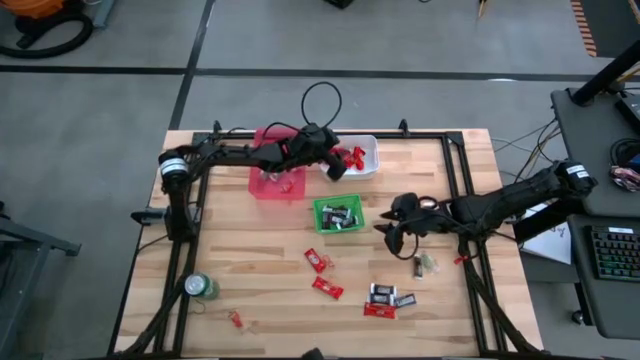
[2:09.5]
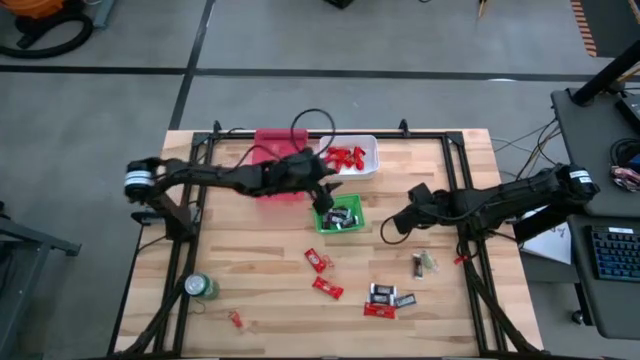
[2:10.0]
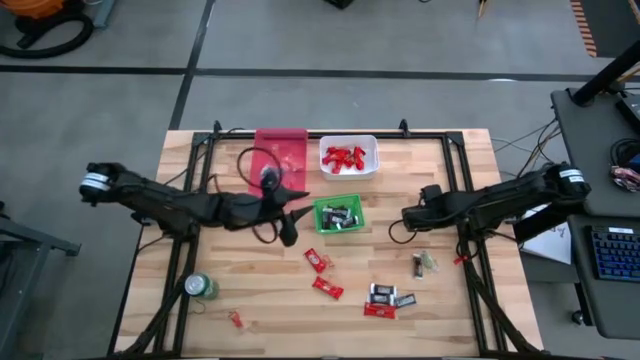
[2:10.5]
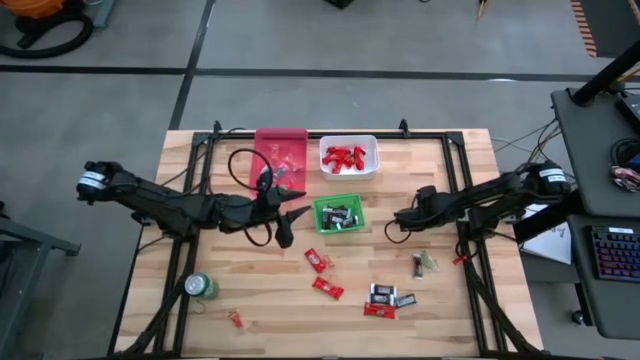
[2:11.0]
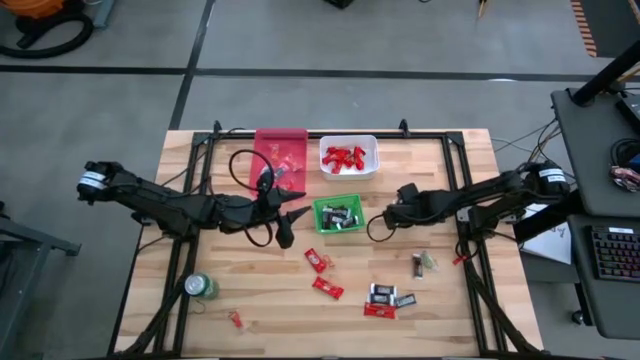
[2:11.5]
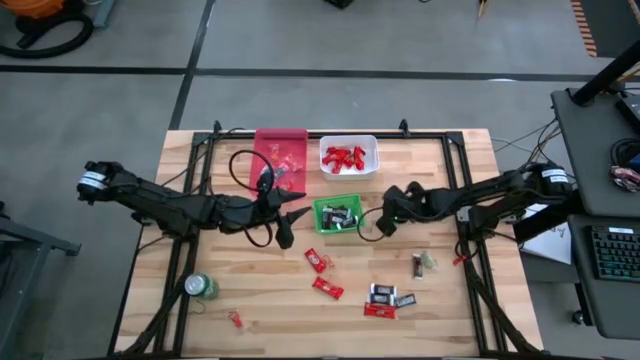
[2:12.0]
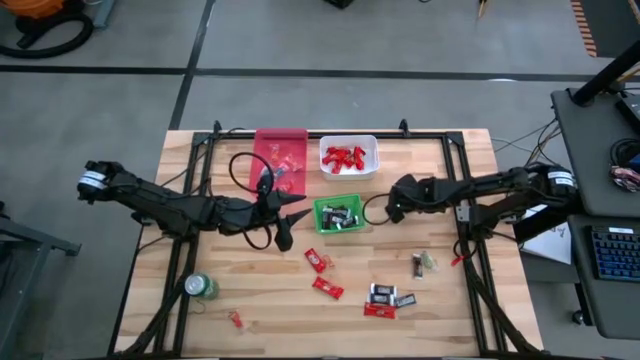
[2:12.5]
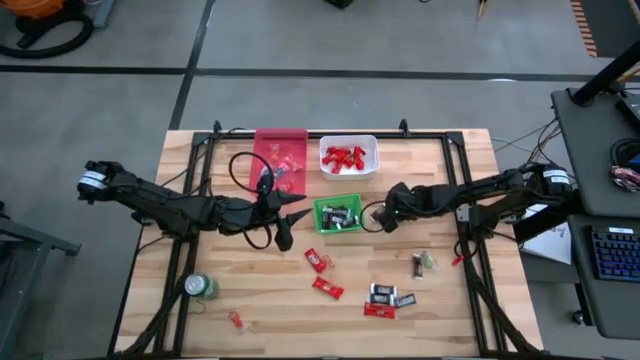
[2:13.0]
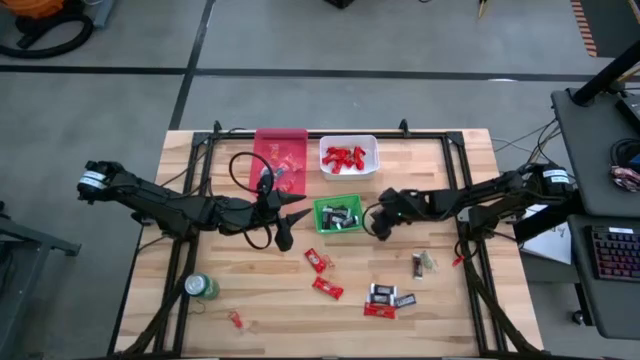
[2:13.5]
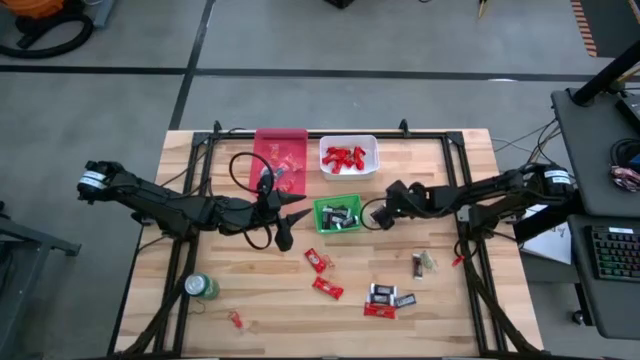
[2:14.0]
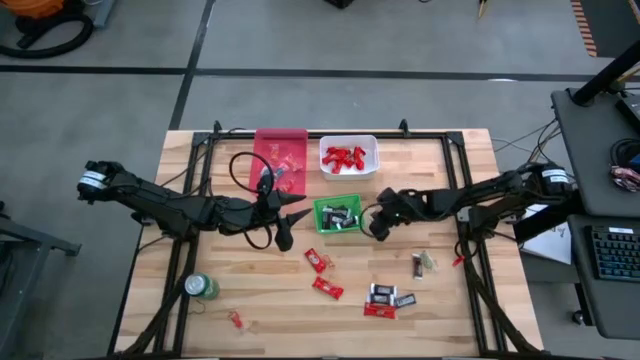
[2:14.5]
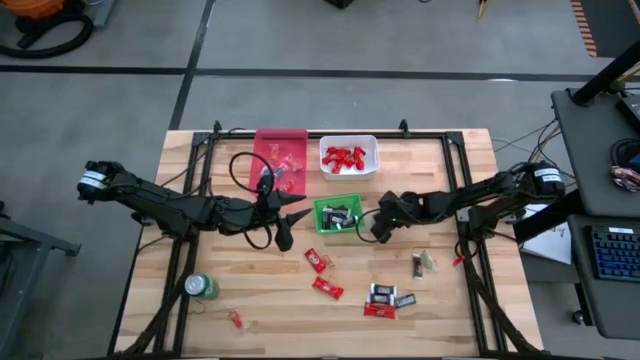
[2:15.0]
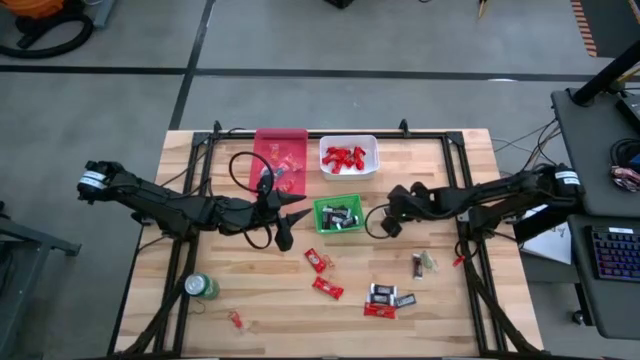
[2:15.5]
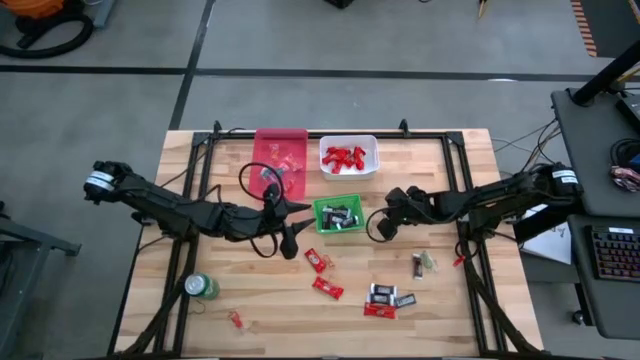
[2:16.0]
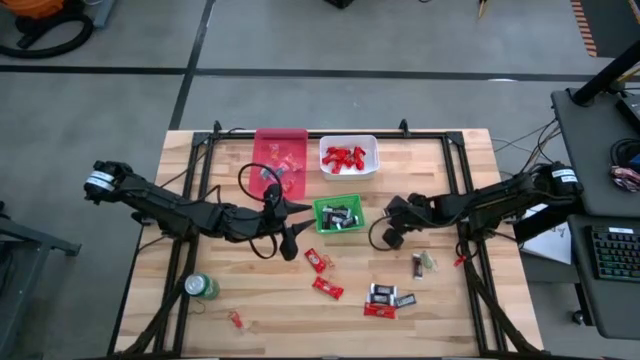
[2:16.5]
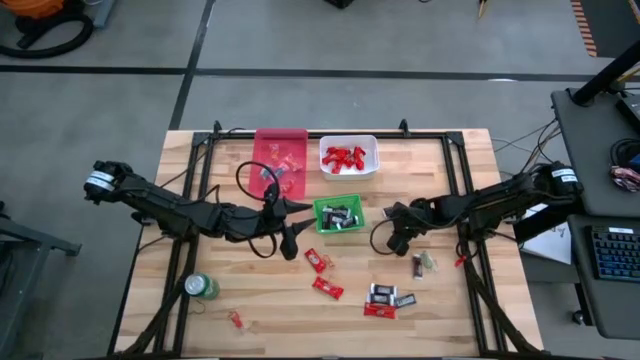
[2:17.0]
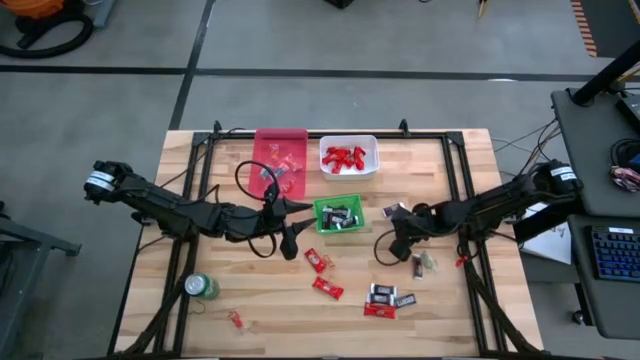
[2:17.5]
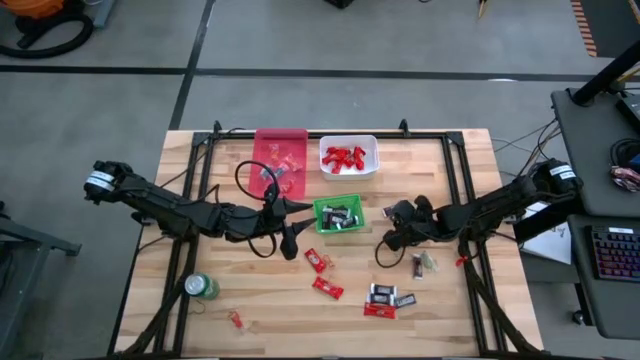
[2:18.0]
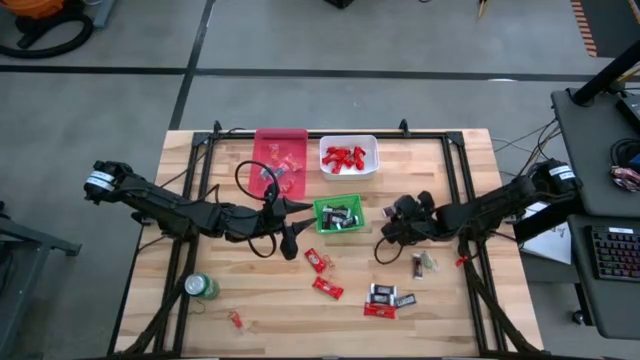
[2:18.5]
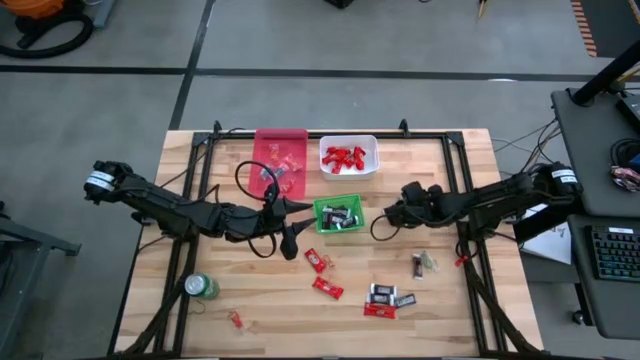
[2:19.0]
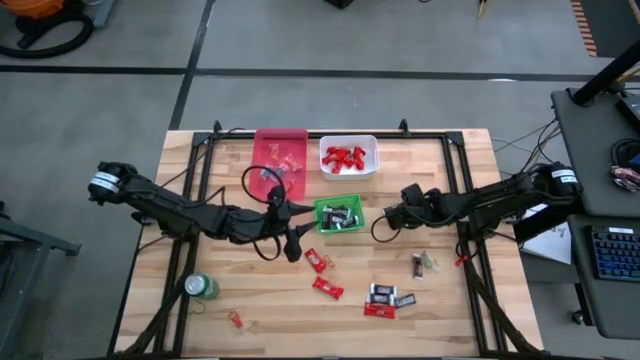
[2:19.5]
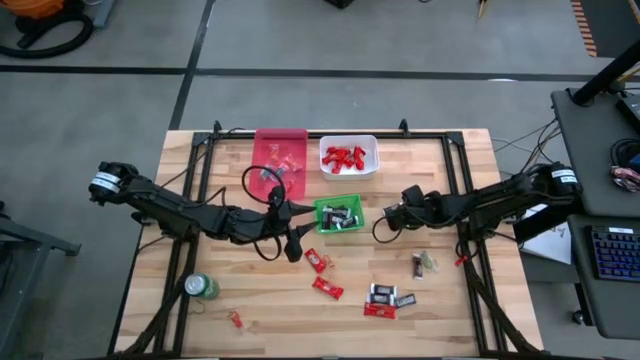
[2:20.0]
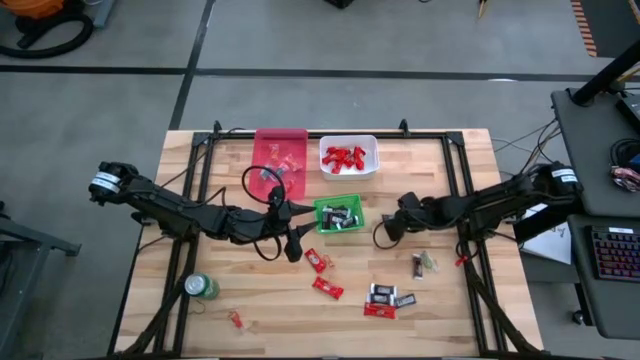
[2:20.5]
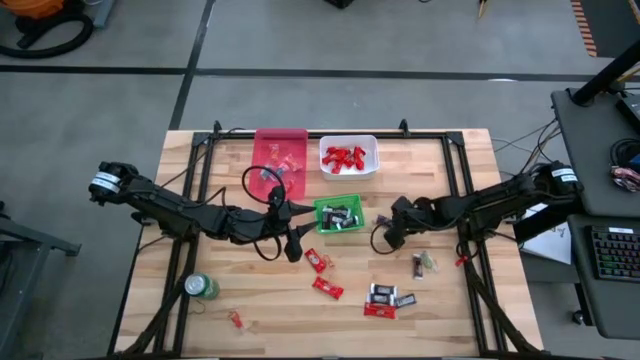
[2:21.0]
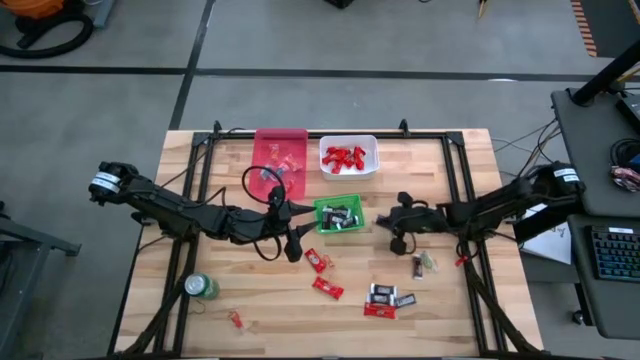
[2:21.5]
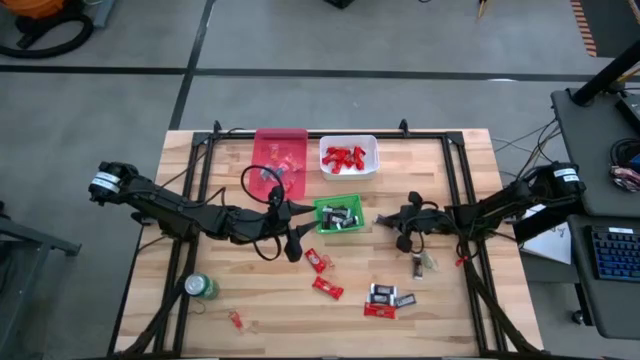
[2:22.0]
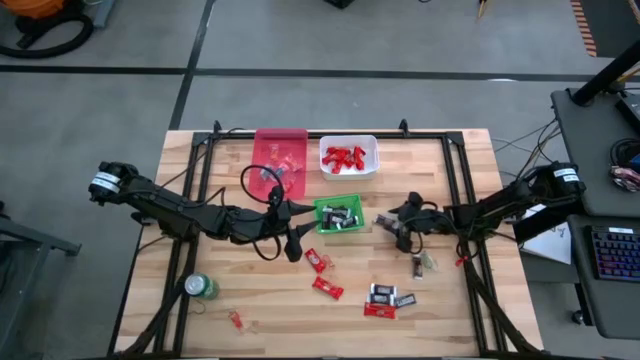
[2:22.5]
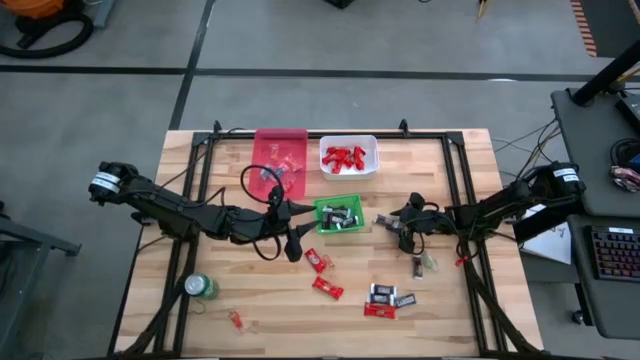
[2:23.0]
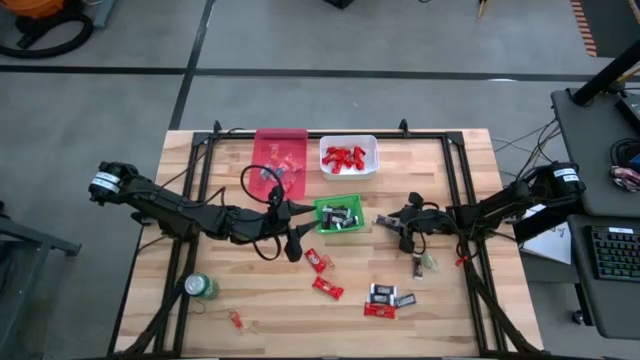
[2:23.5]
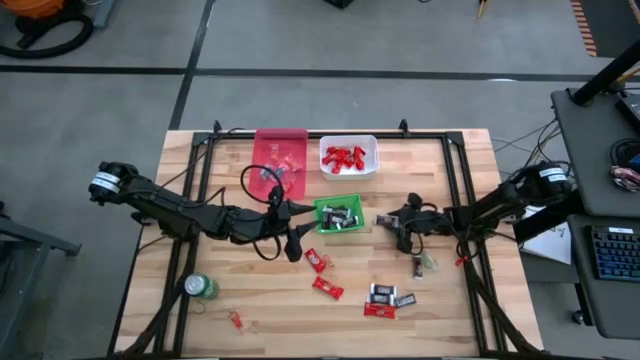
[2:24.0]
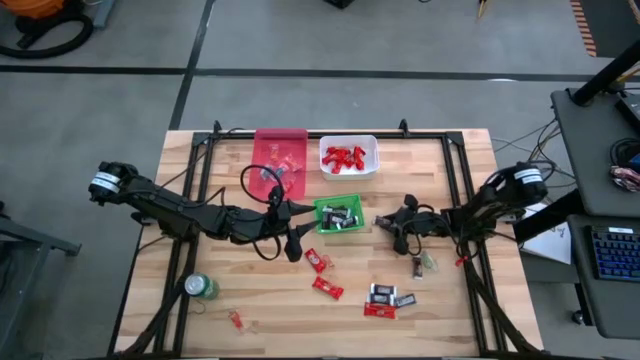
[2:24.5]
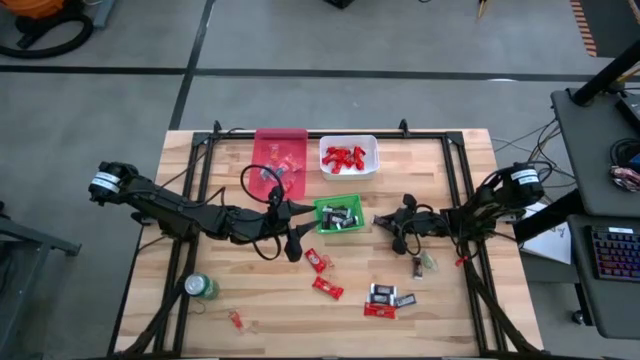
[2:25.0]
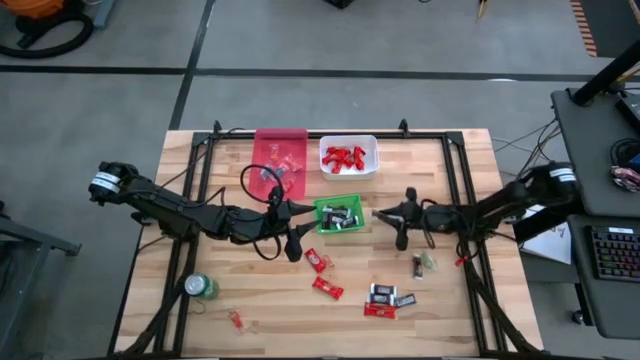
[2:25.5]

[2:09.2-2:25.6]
Task: Sort candy
Put the brown chocolate bar into the green bin

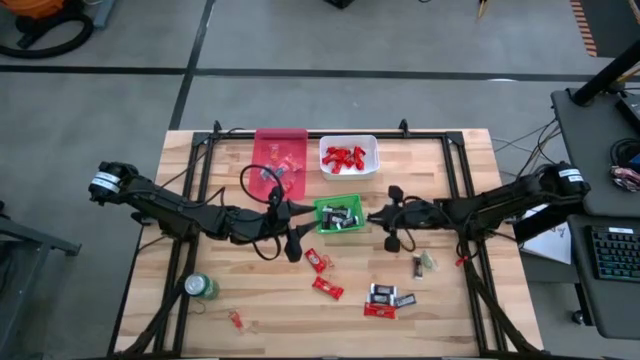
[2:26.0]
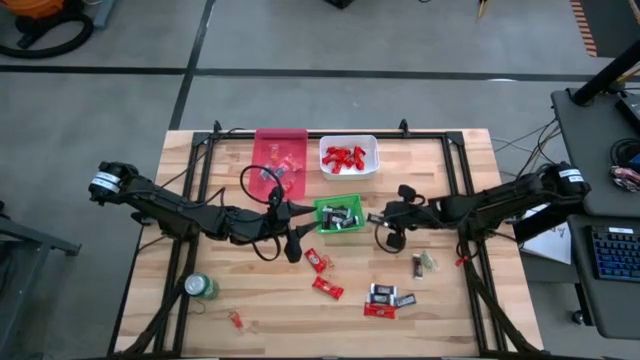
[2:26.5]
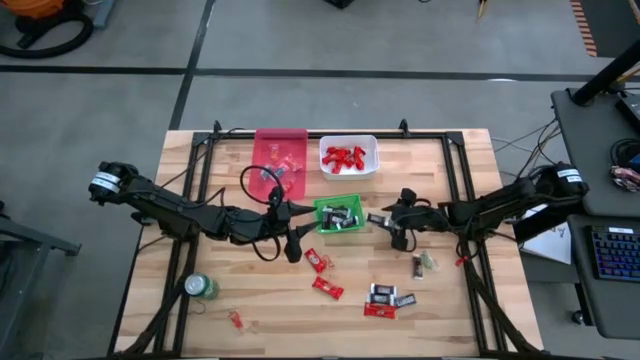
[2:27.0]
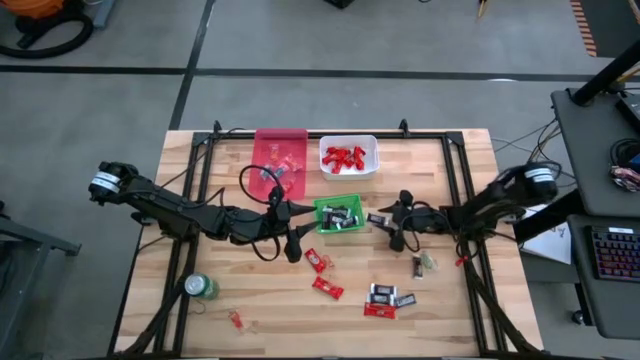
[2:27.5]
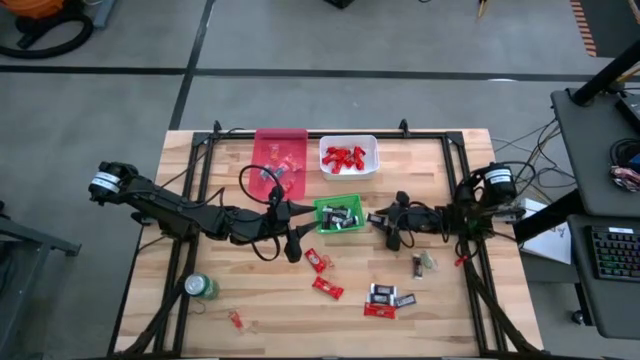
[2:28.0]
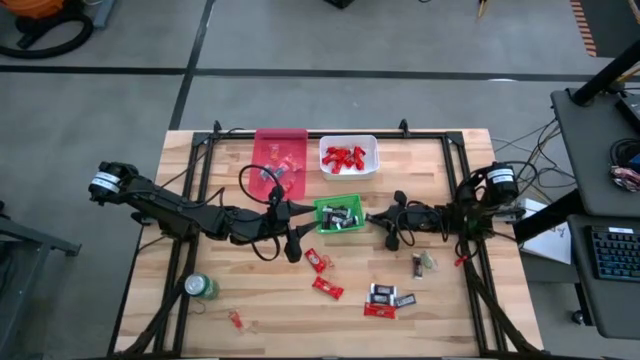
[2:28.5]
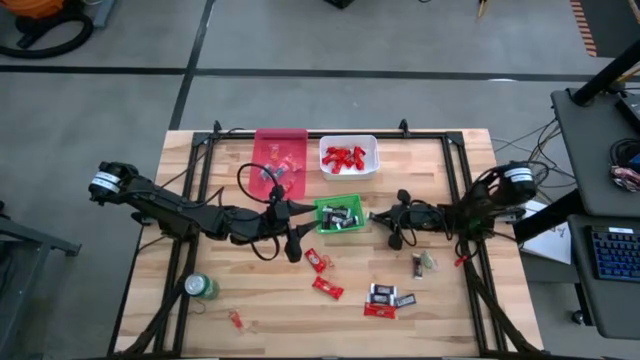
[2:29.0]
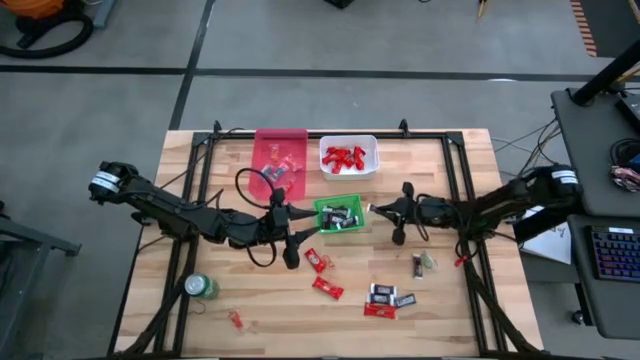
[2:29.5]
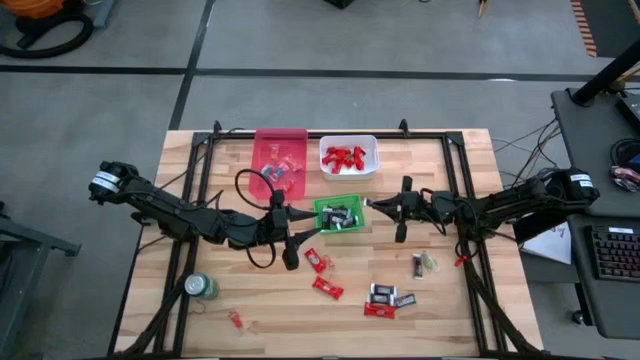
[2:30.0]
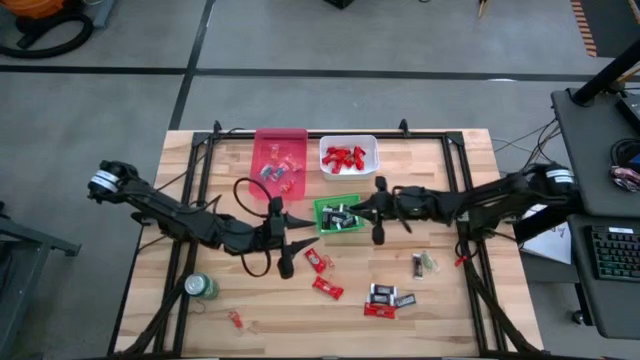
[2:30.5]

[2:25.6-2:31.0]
Put the brown chocolate bar into the green bin
